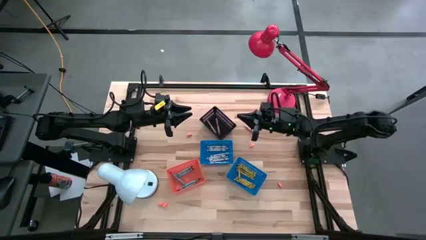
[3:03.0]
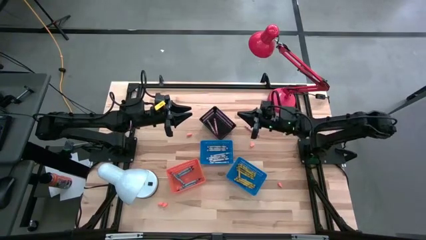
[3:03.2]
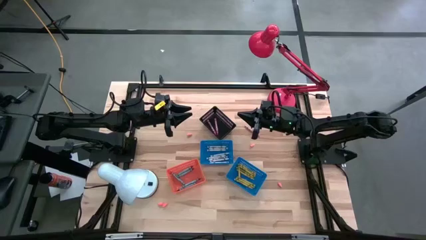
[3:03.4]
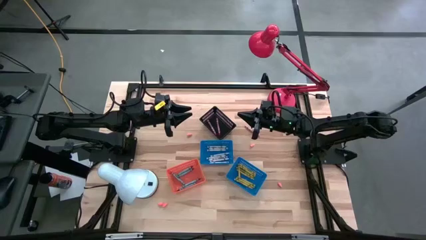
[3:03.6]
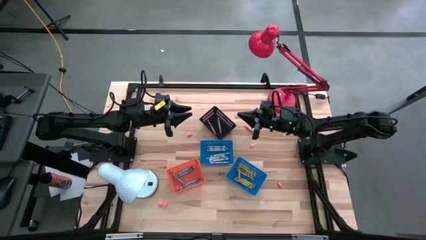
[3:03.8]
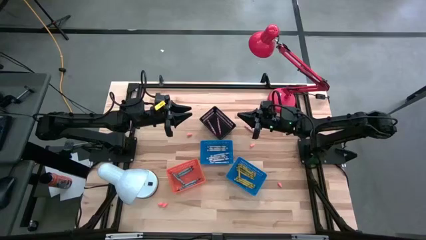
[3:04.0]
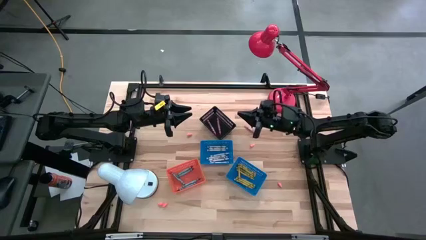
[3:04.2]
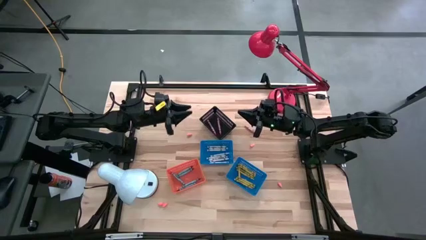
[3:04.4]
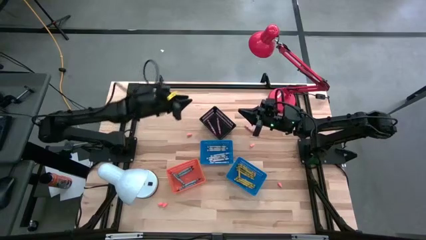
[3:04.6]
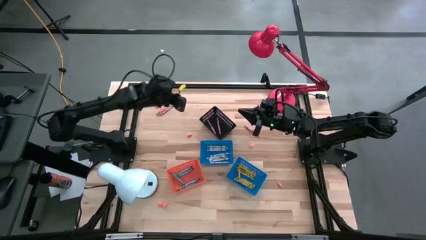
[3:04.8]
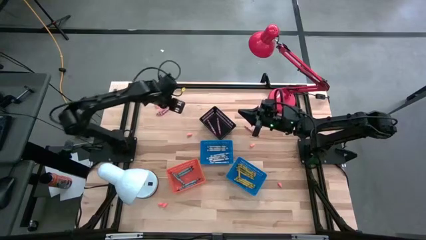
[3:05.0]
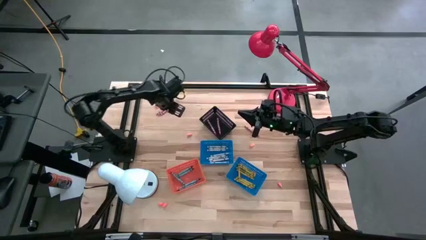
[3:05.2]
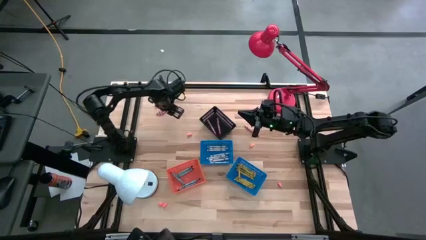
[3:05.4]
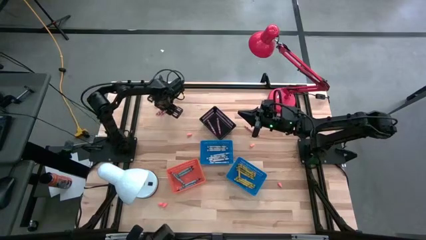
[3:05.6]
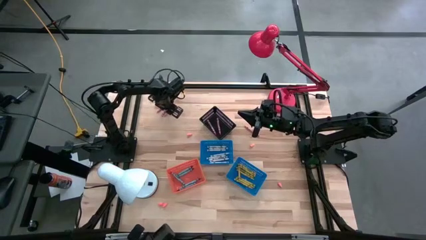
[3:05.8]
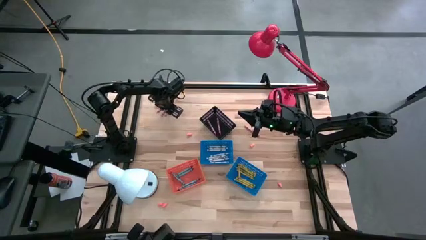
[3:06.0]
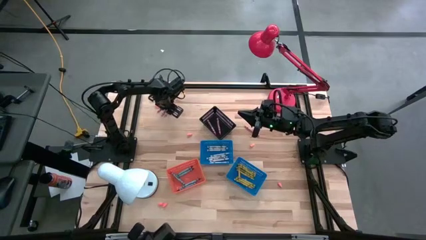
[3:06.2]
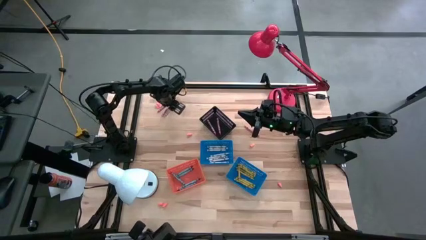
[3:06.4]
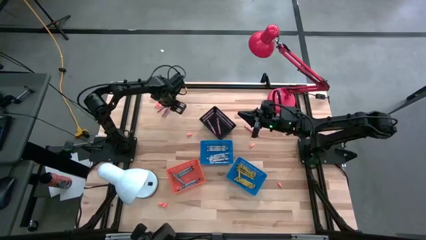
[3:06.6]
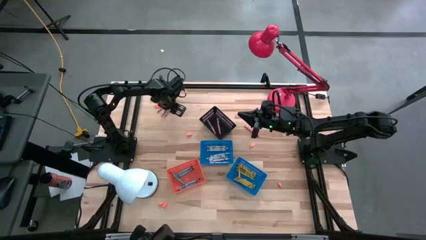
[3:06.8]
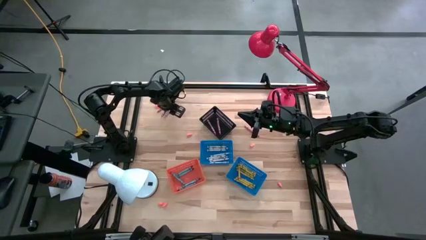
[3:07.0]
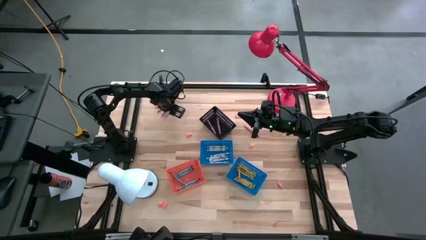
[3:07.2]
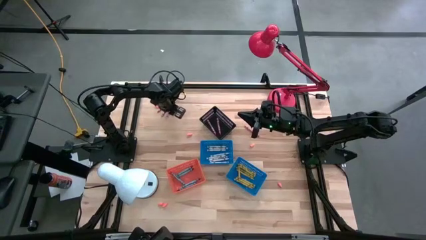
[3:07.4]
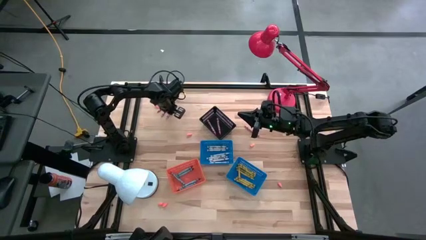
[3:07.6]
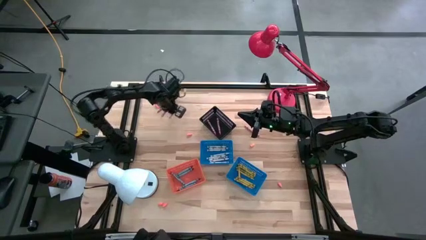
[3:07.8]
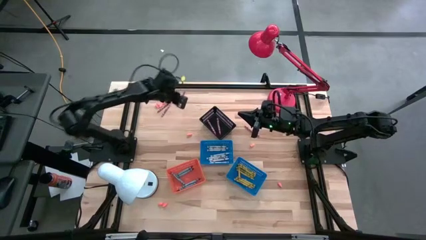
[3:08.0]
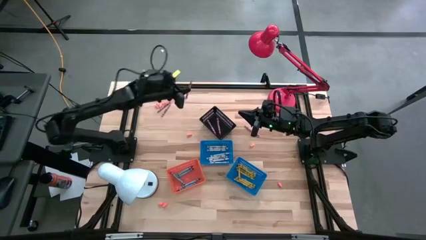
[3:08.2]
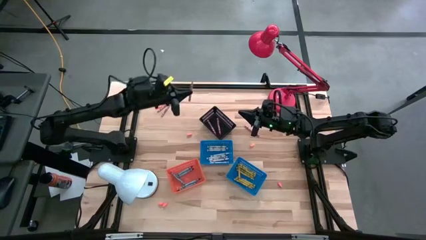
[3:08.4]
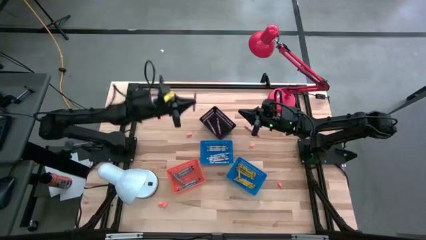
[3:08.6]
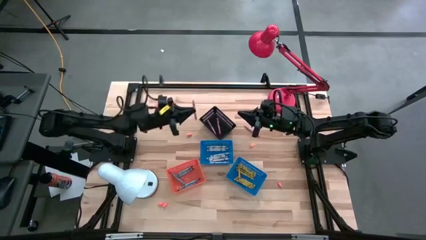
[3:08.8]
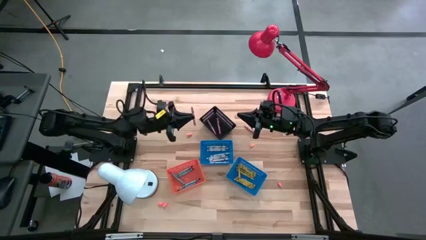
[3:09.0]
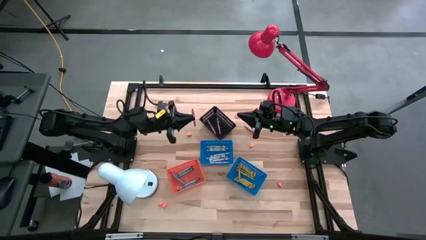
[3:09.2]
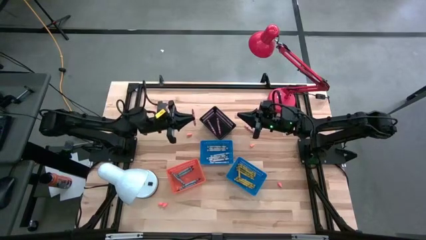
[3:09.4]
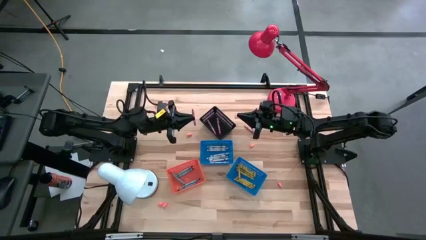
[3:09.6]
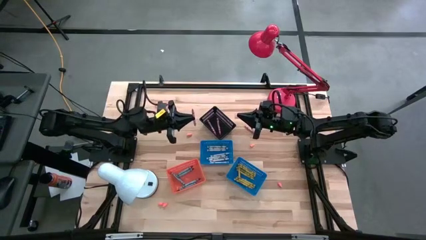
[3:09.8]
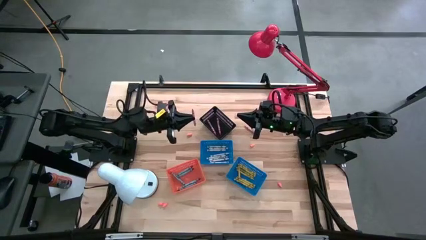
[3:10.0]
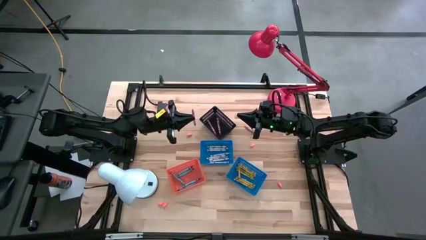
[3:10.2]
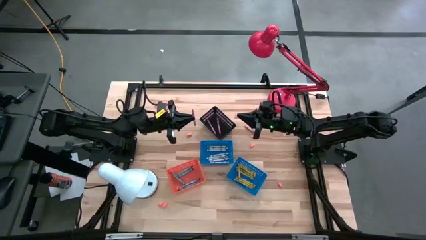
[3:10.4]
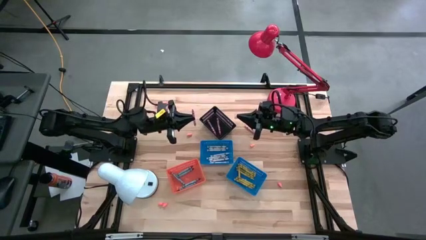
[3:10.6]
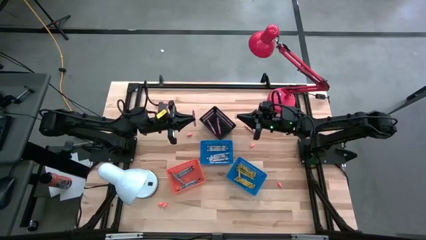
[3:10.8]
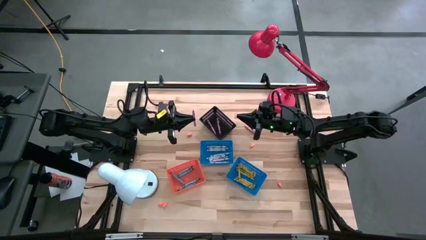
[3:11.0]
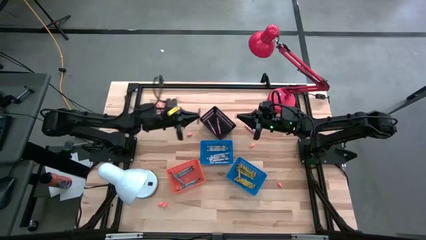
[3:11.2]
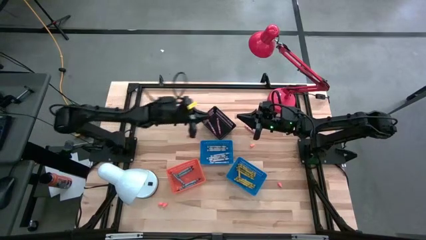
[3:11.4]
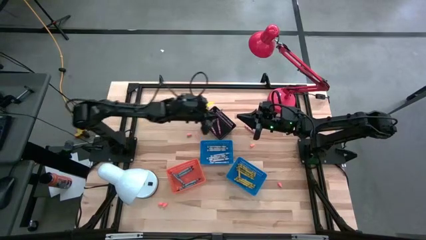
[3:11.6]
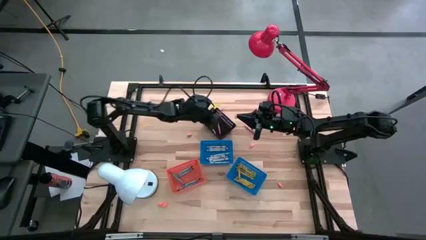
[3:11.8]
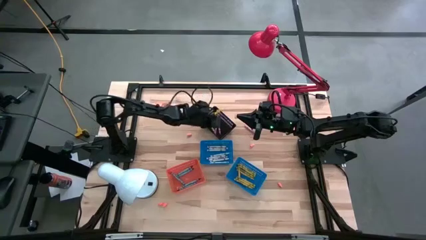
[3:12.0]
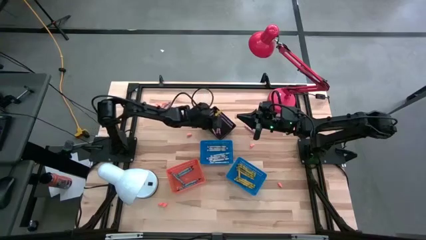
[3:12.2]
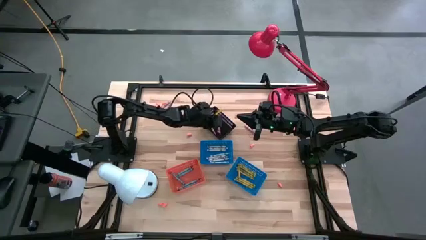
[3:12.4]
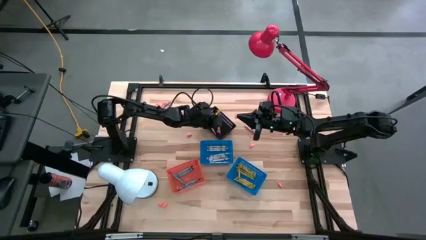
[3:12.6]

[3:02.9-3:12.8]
Task: Sort crayons
Put the pink crayon into the black bin

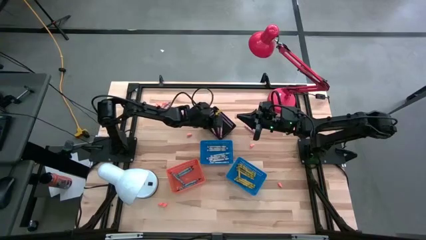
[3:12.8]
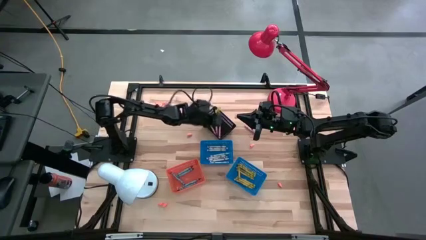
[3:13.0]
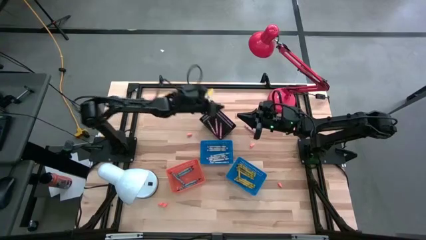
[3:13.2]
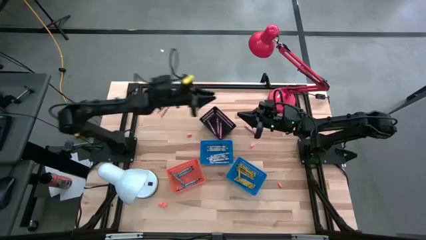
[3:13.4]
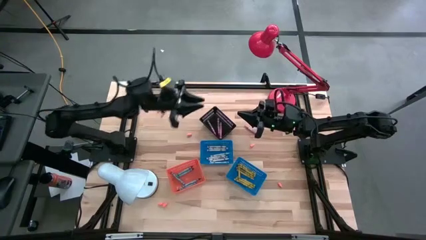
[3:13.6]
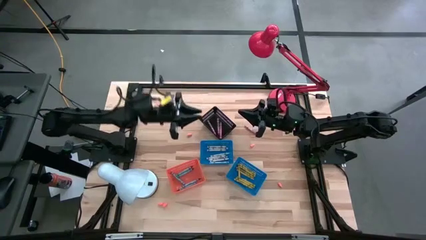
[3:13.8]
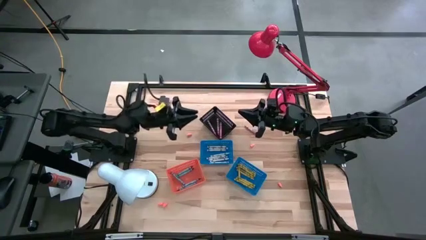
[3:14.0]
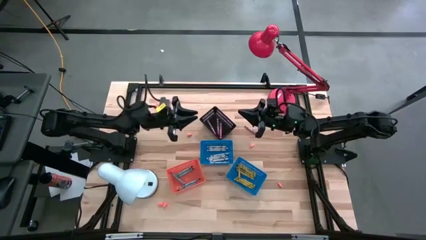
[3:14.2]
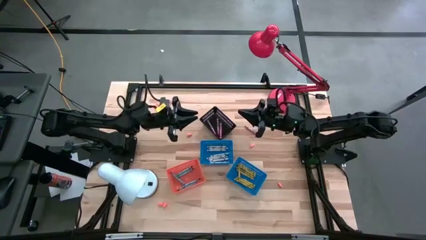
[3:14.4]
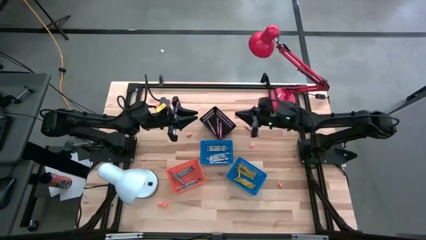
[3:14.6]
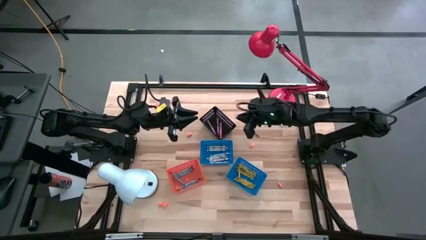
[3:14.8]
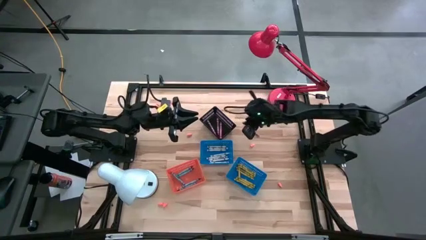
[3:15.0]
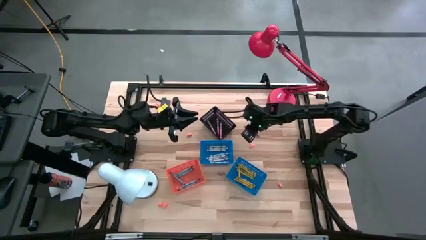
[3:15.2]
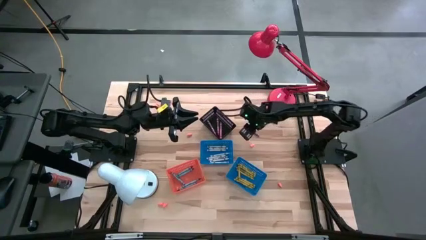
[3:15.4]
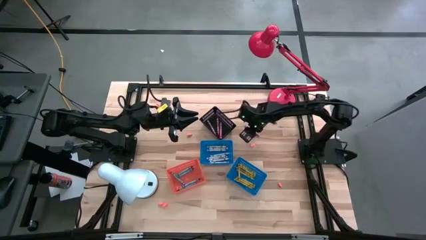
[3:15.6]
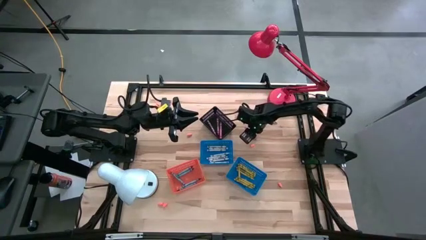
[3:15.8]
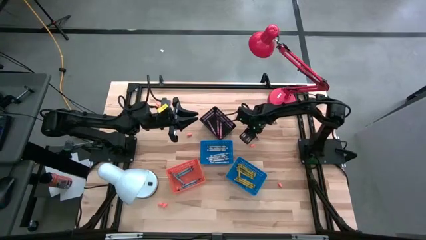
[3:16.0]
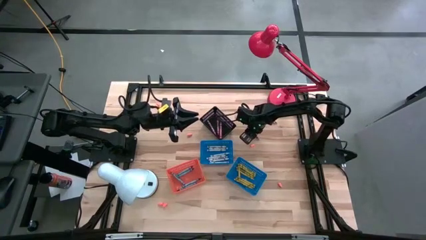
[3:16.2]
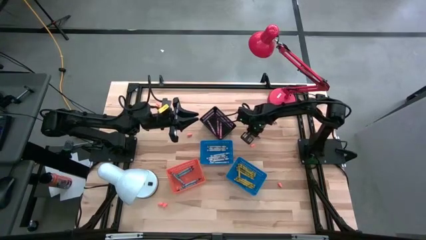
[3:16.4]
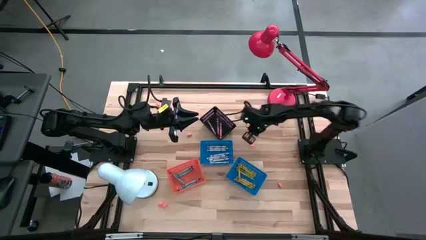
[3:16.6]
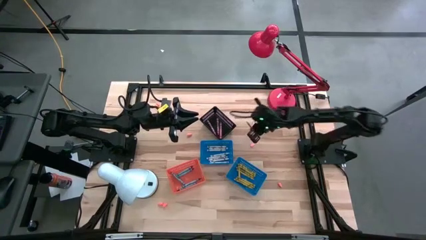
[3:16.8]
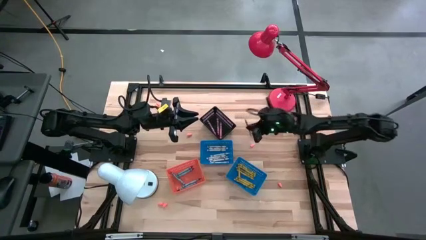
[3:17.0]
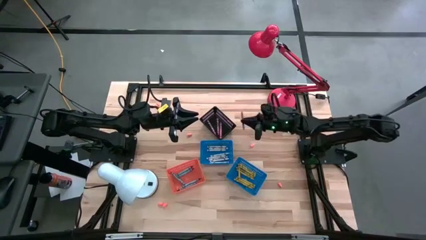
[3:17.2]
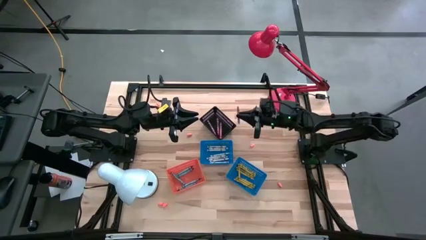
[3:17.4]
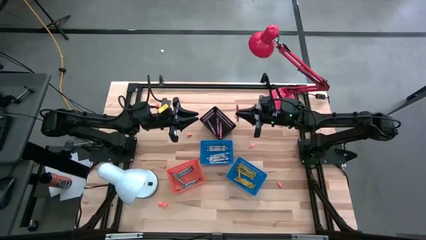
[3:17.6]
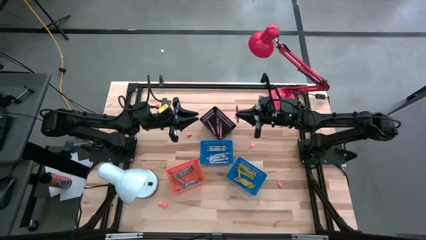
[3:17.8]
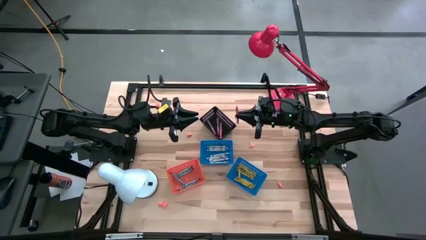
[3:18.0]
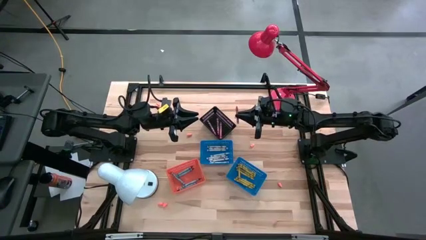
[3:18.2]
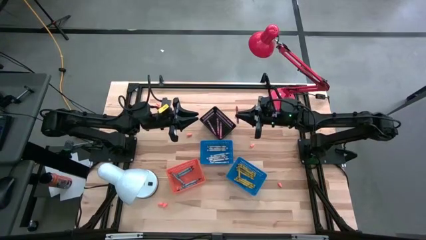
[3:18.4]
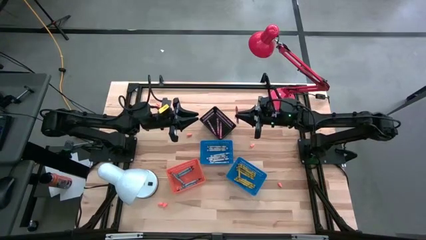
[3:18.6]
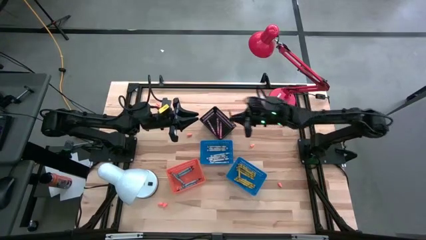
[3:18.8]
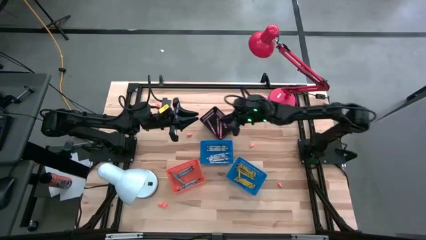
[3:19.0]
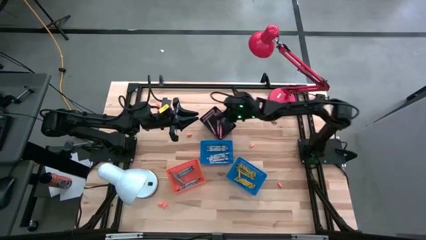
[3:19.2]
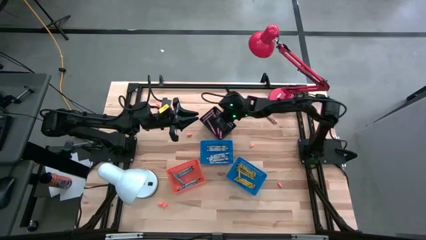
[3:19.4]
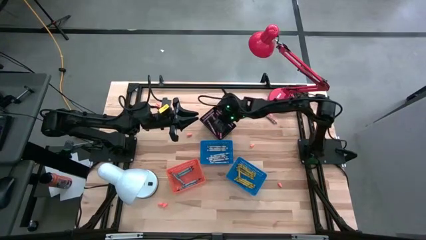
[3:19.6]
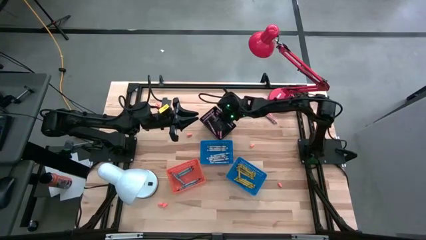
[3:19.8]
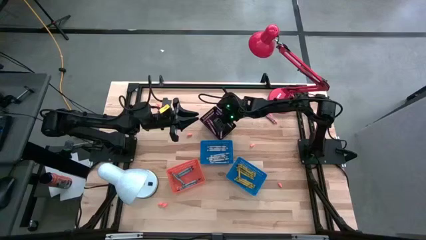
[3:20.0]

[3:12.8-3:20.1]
Put the pink crayon into the black bin
